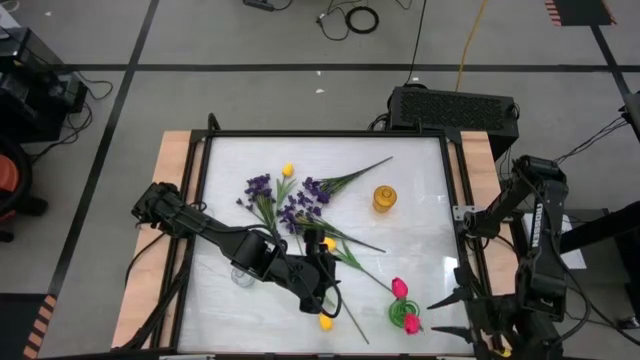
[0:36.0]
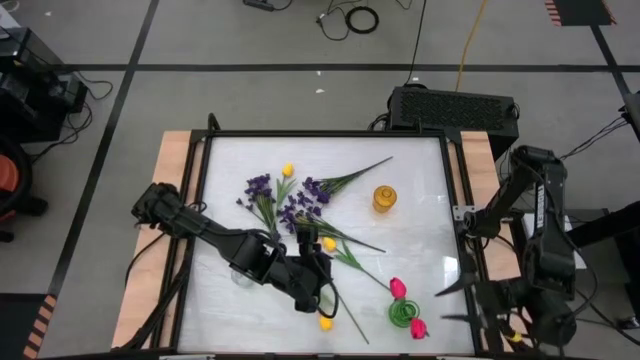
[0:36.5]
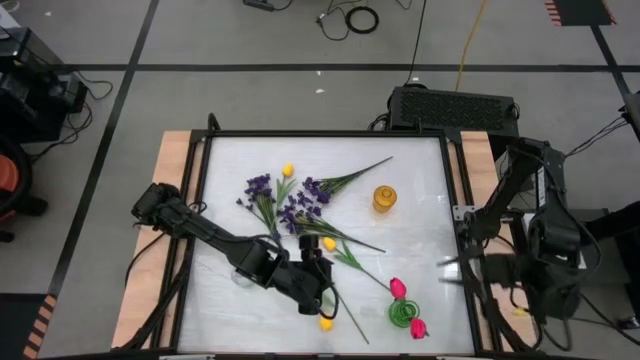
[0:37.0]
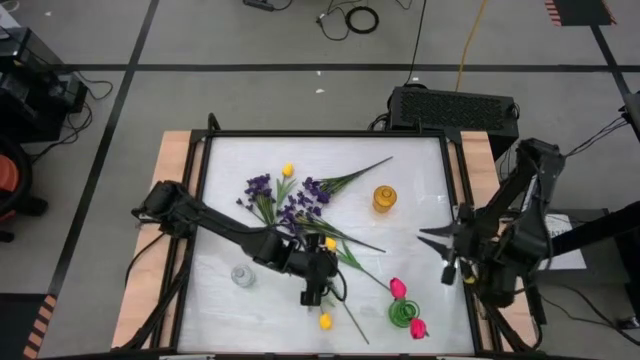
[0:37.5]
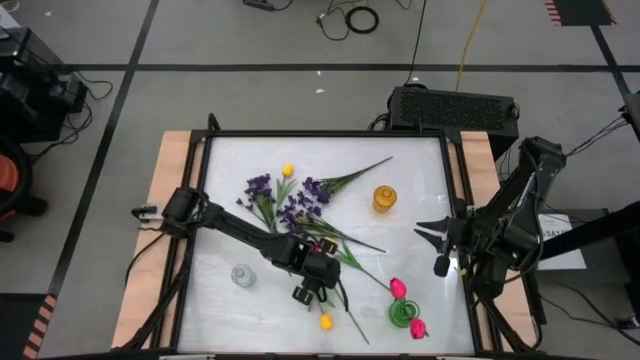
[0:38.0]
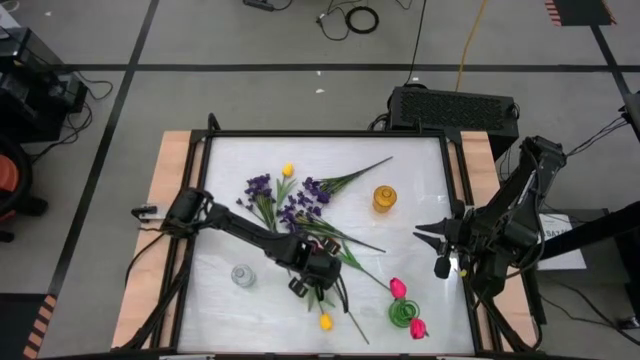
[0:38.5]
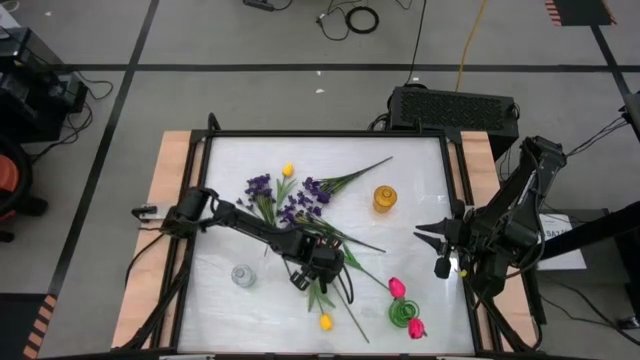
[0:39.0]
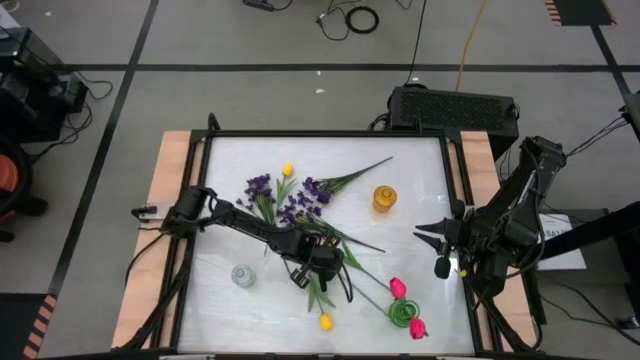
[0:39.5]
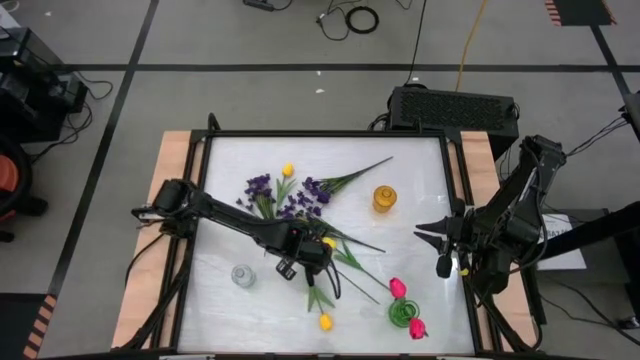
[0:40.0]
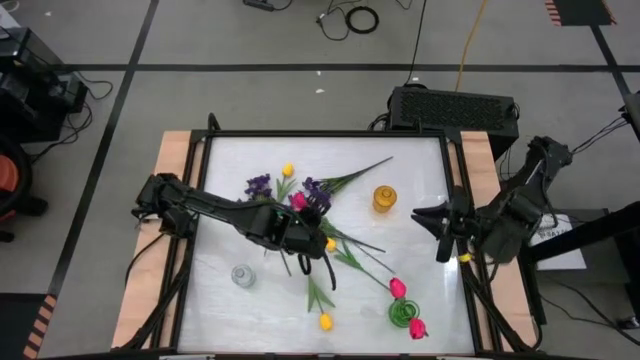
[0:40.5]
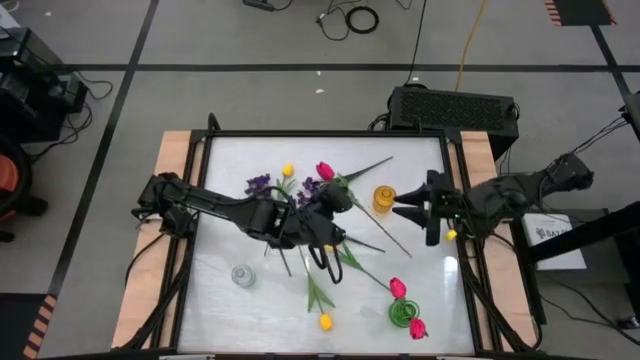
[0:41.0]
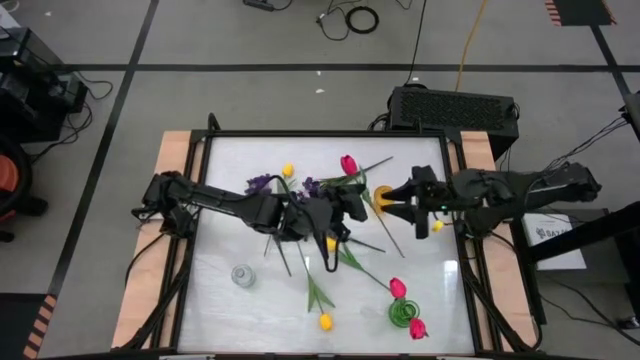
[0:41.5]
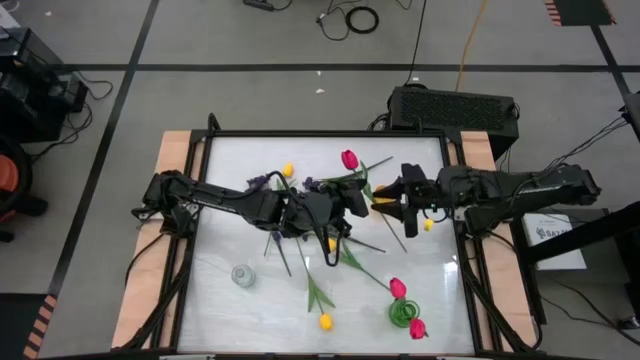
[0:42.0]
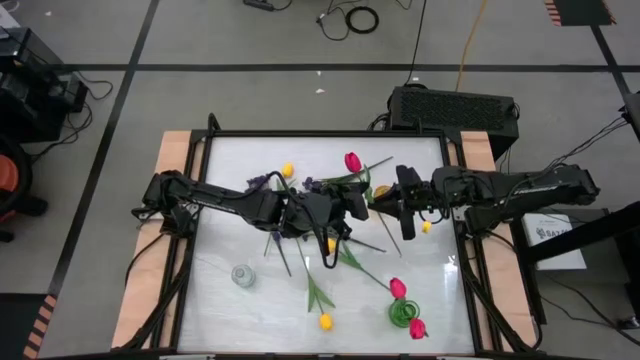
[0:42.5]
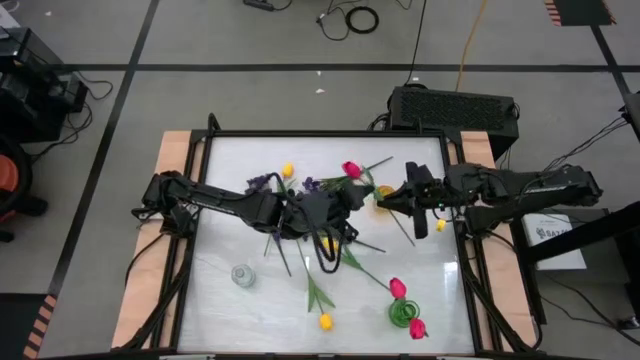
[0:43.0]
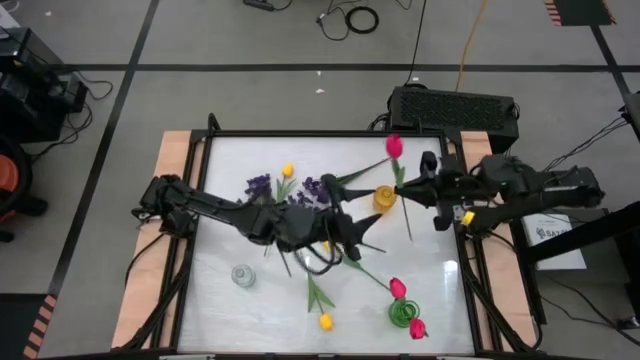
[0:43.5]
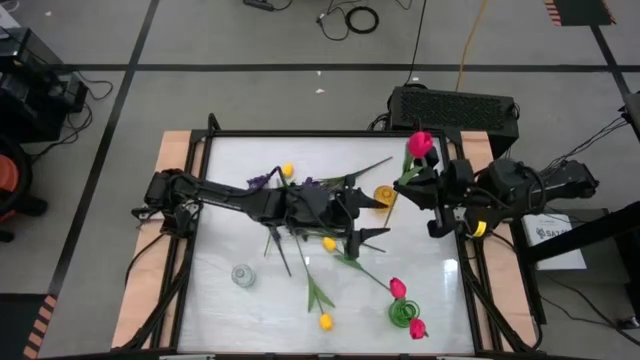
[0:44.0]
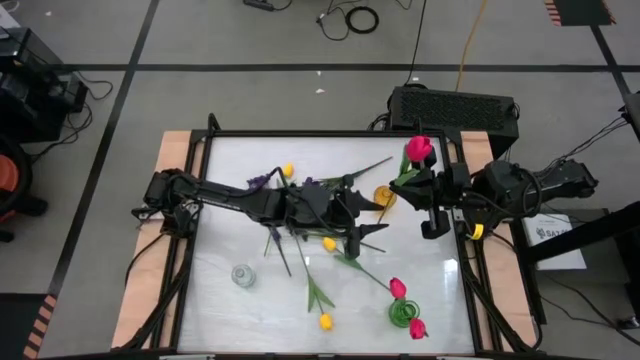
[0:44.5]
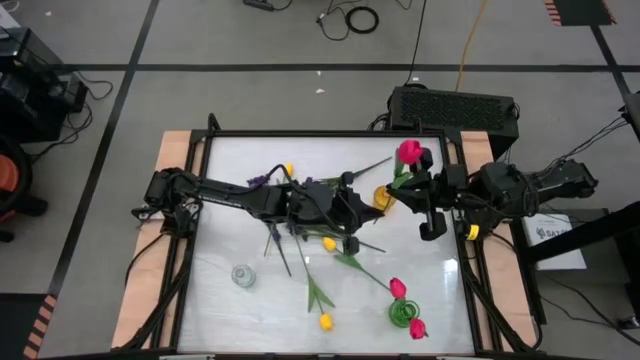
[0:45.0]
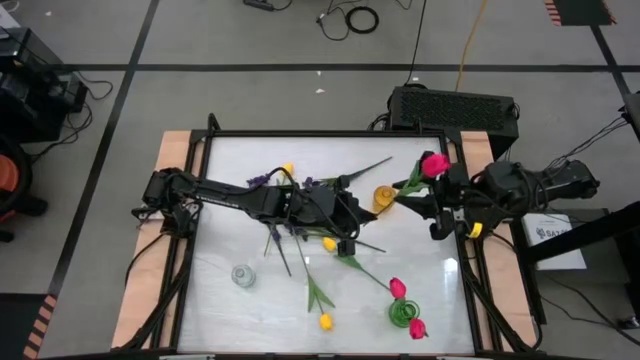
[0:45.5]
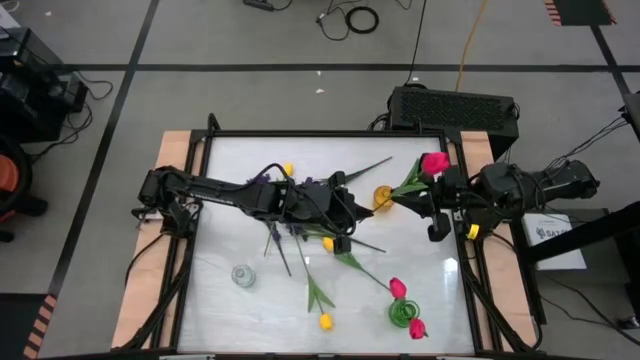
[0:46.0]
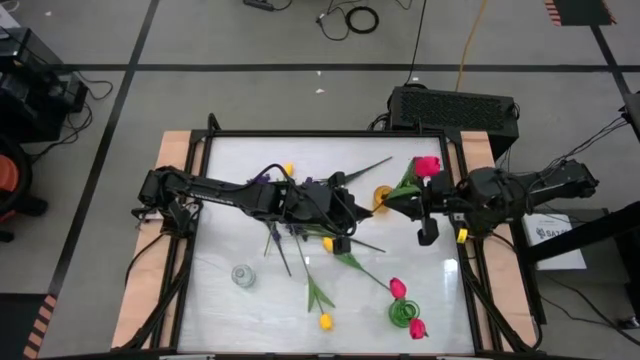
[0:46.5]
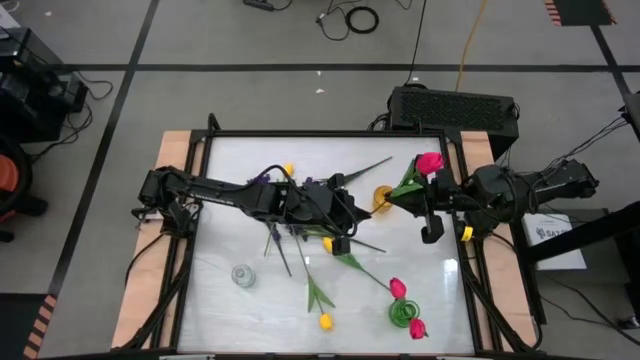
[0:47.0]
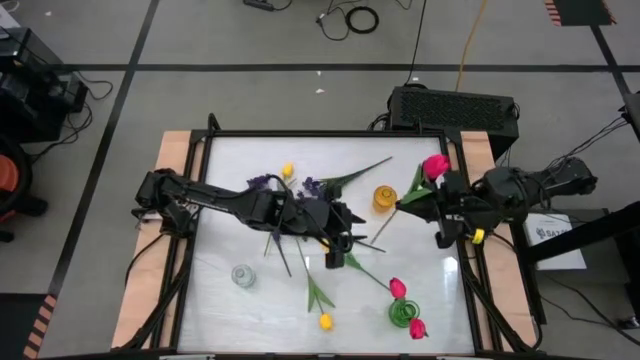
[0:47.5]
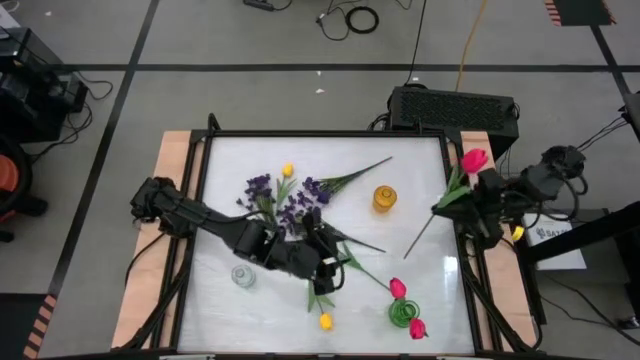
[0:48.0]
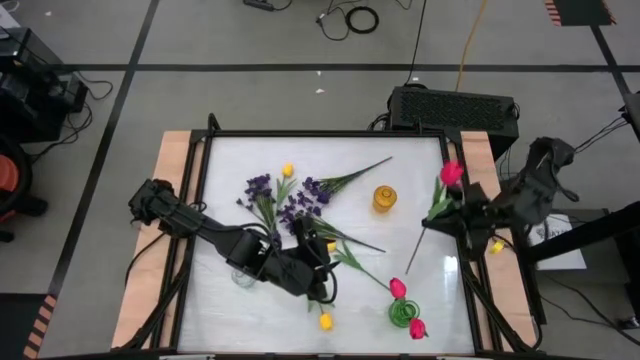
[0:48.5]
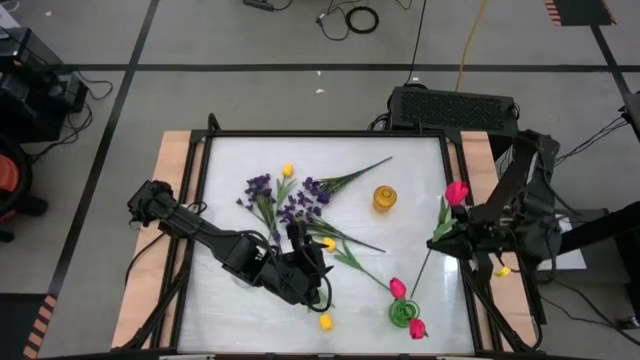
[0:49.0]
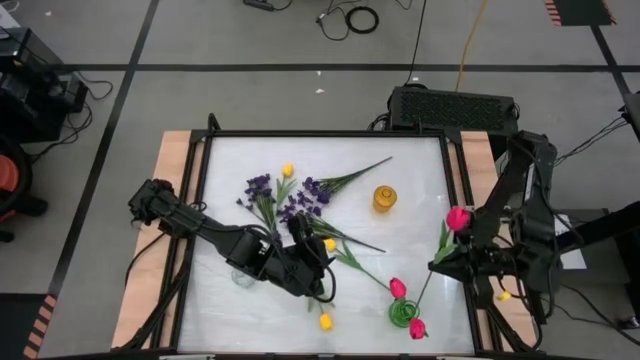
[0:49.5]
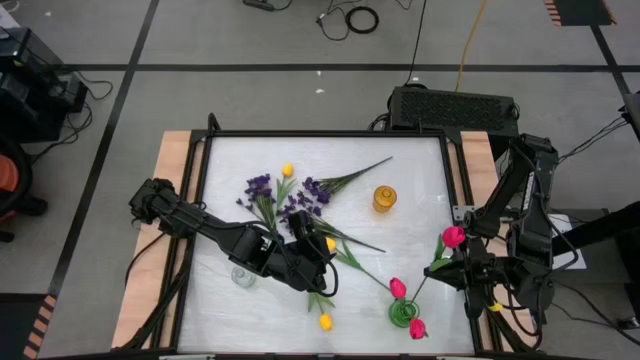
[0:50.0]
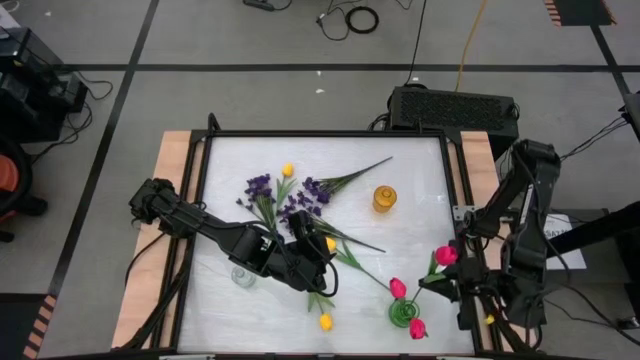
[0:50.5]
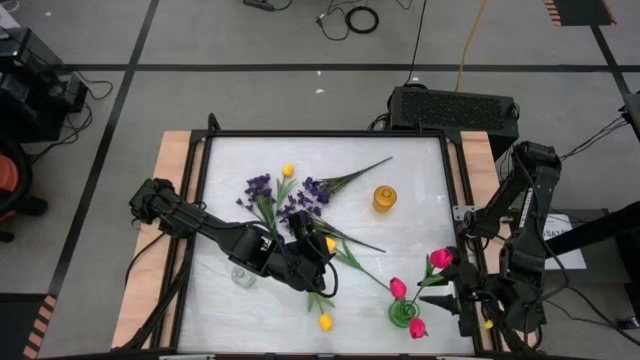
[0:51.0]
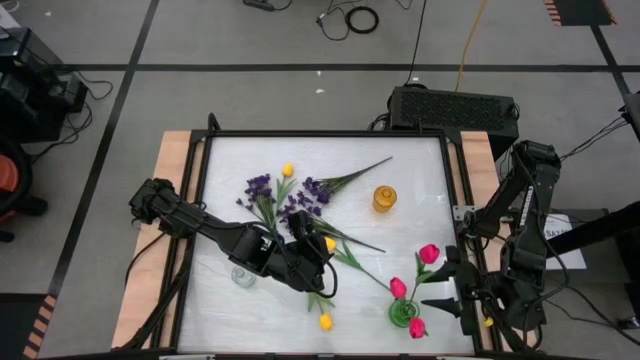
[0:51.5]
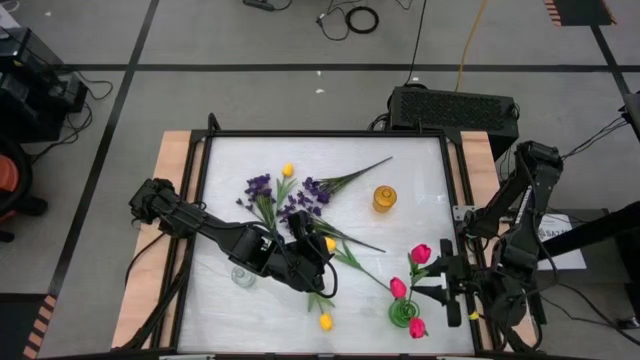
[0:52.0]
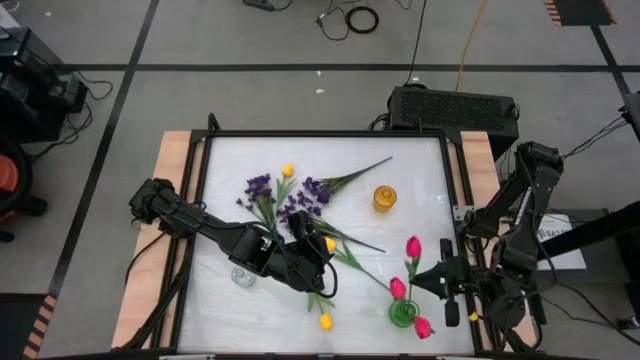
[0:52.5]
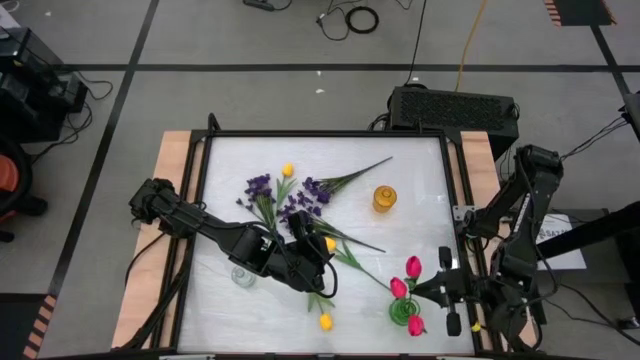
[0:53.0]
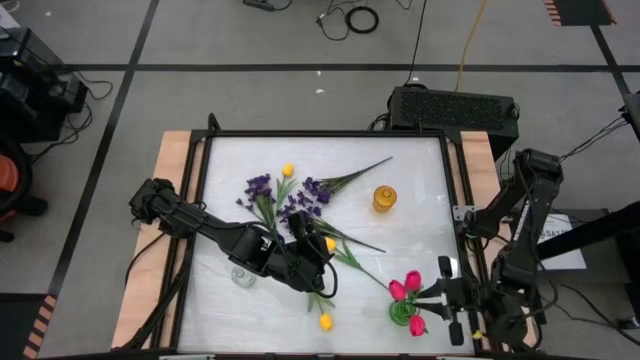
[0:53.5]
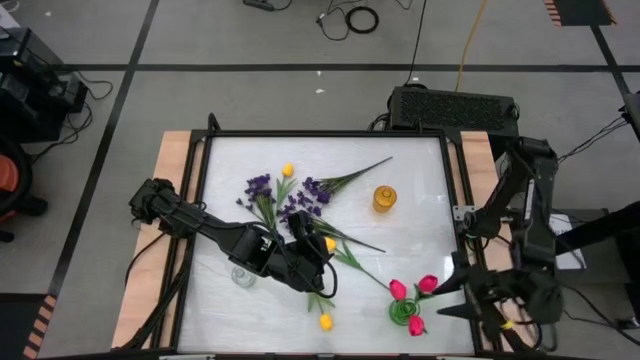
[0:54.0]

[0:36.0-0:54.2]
Task: Sort flowers into vase by color
Put the red flower into the green vase

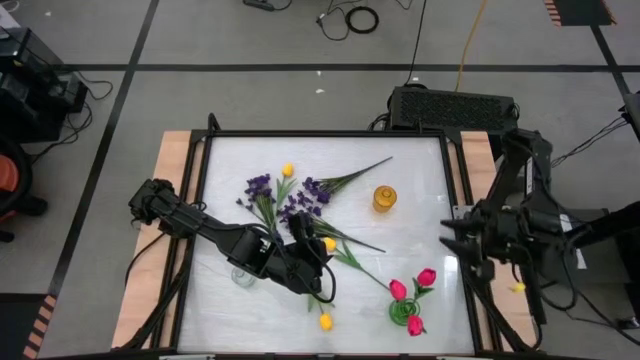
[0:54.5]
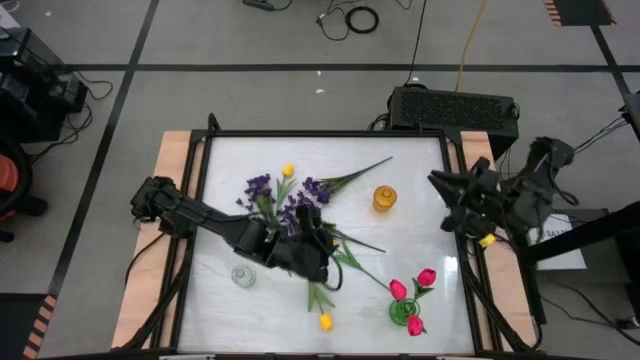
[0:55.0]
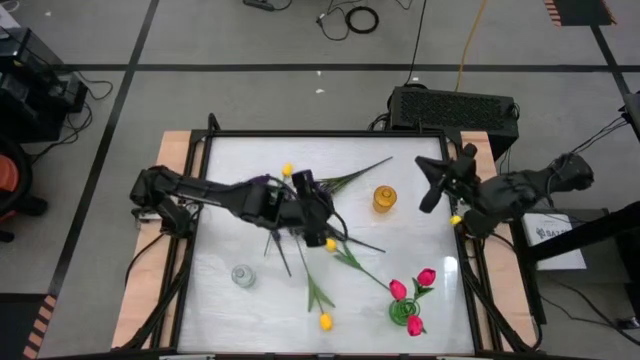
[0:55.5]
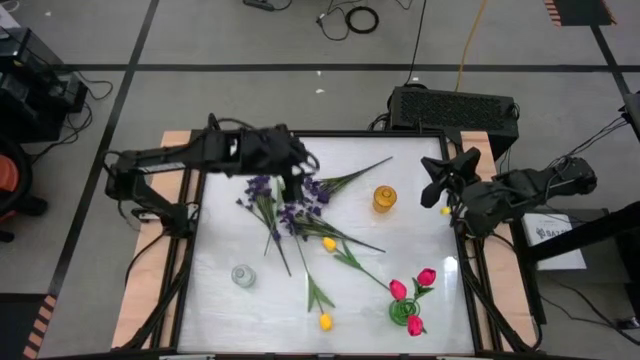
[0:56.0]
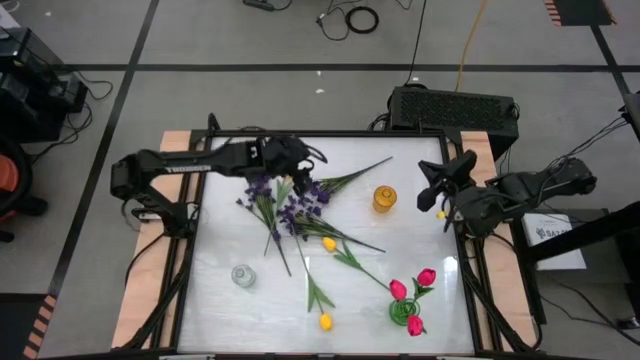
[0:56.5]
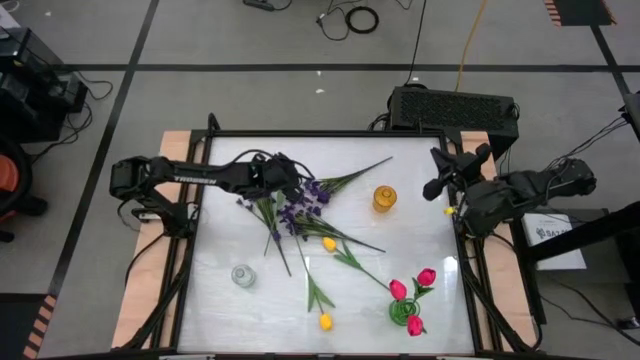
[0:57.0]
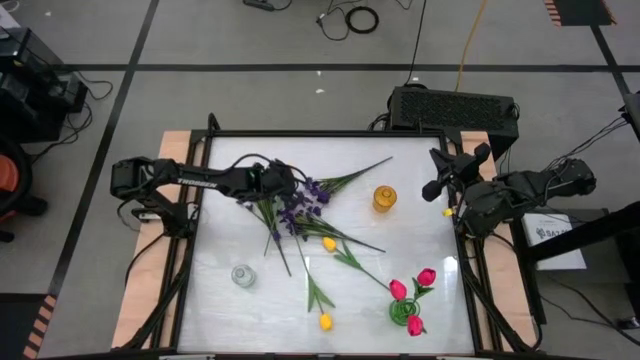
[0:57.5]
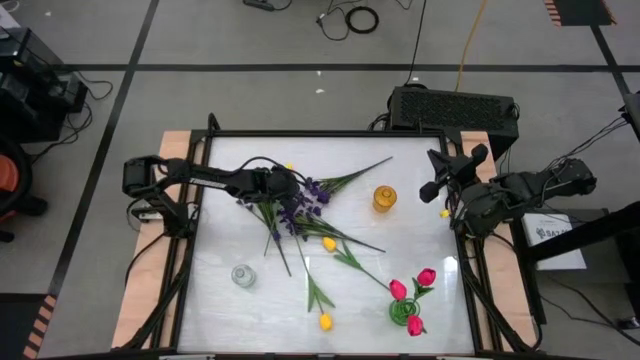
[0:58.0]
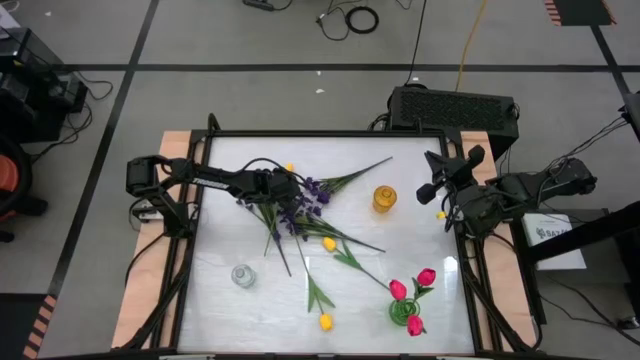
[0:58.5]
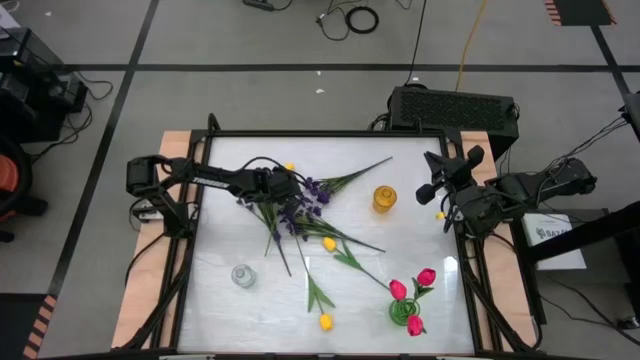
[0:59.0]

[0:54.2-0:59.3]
Put the top left yellow flower into the transparent vase
